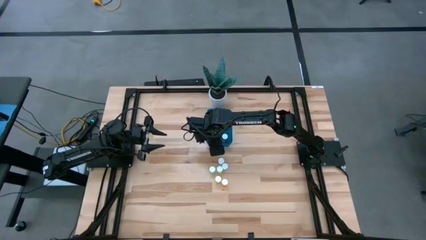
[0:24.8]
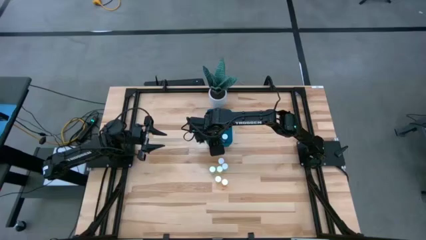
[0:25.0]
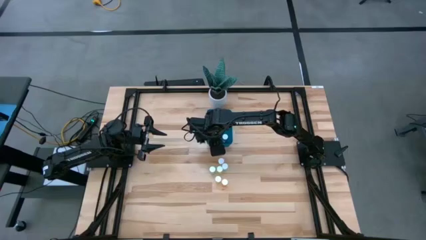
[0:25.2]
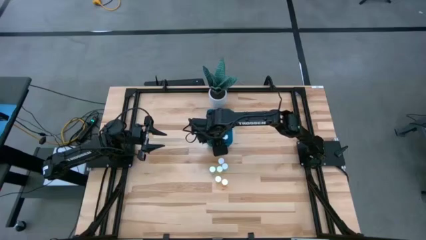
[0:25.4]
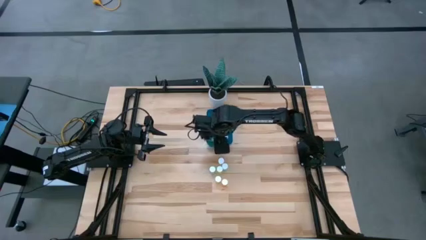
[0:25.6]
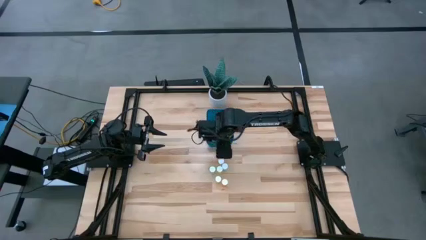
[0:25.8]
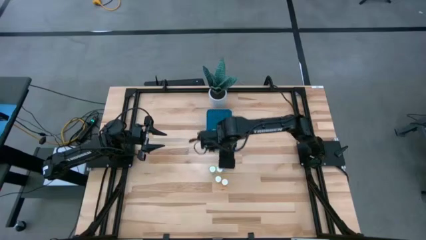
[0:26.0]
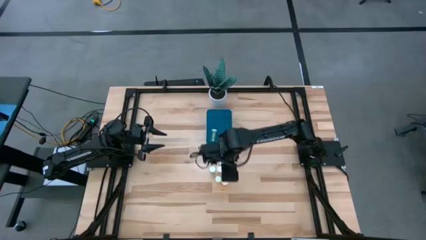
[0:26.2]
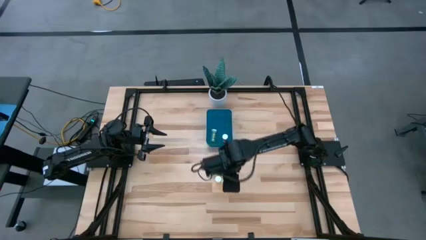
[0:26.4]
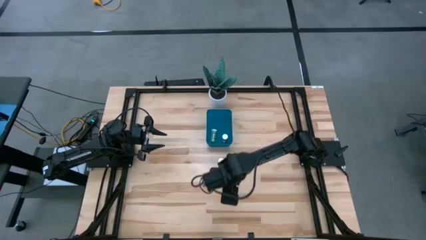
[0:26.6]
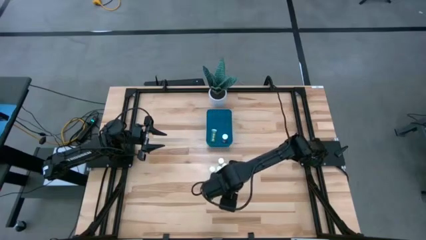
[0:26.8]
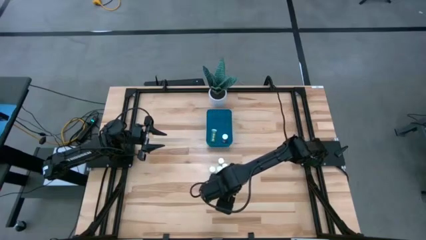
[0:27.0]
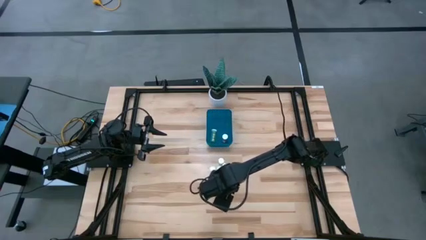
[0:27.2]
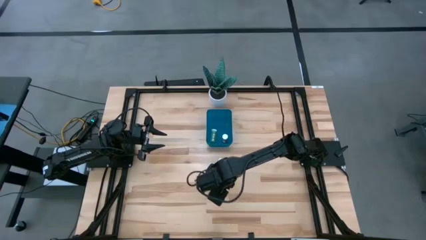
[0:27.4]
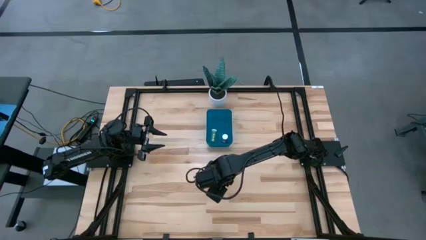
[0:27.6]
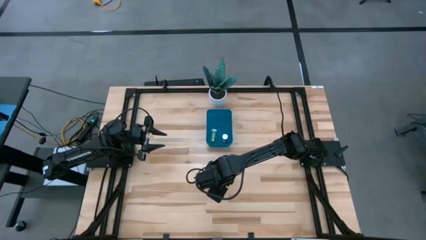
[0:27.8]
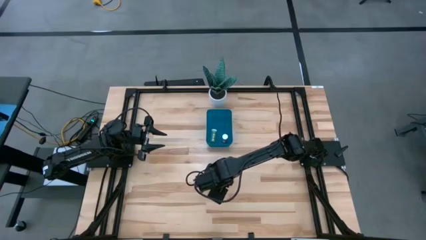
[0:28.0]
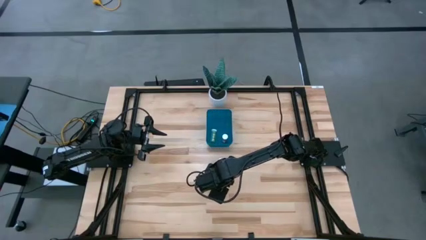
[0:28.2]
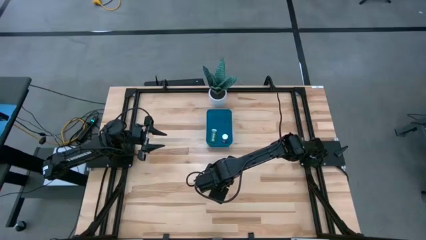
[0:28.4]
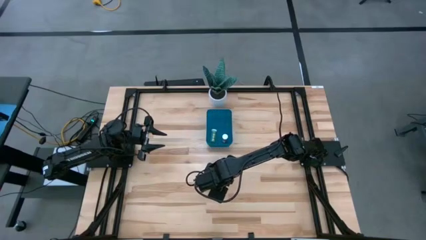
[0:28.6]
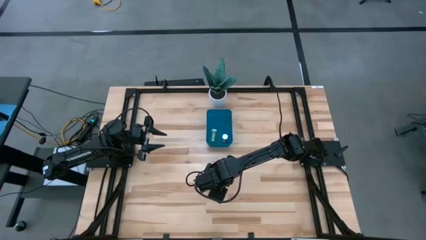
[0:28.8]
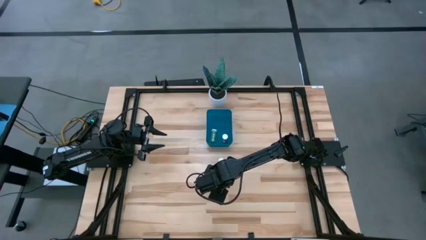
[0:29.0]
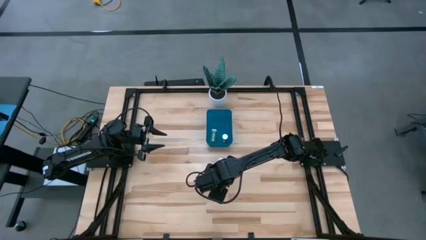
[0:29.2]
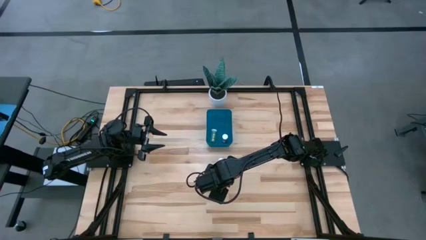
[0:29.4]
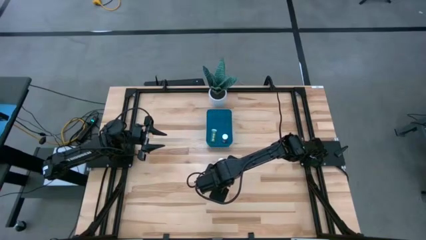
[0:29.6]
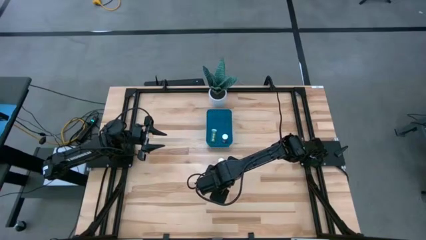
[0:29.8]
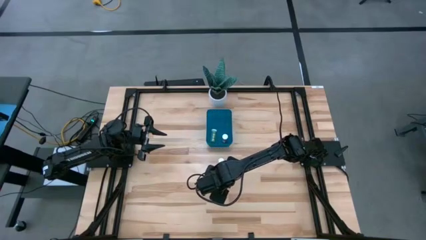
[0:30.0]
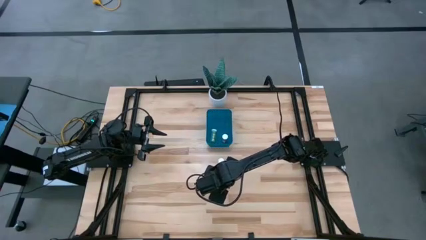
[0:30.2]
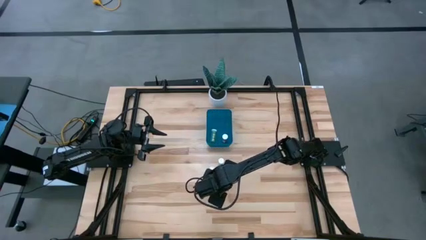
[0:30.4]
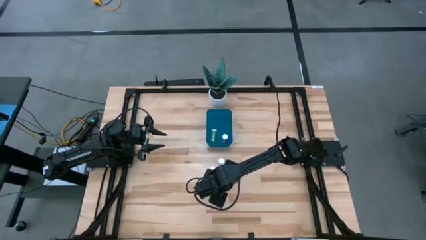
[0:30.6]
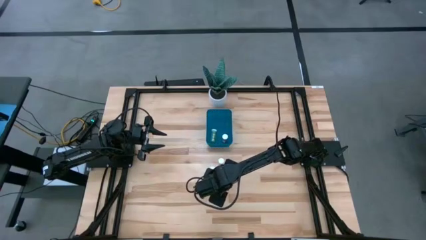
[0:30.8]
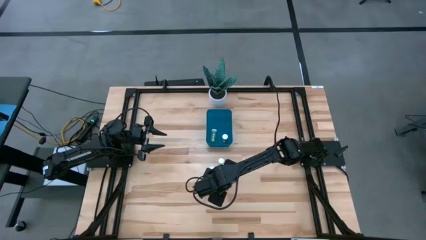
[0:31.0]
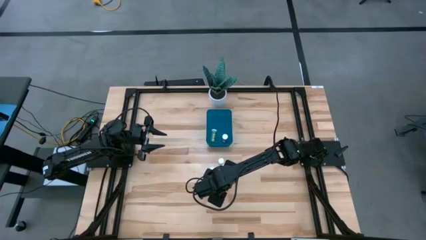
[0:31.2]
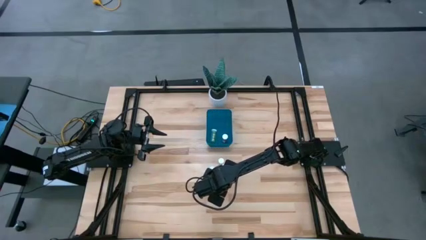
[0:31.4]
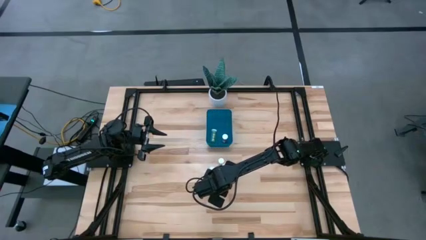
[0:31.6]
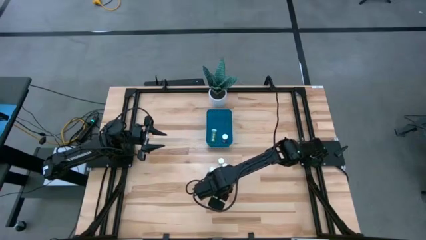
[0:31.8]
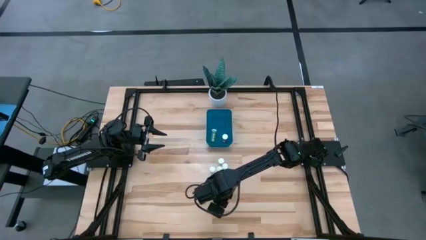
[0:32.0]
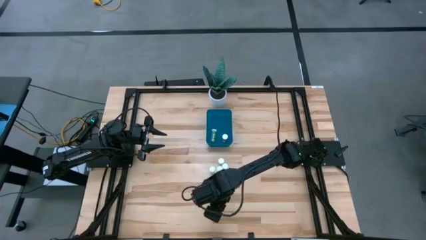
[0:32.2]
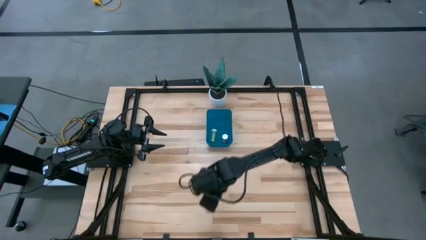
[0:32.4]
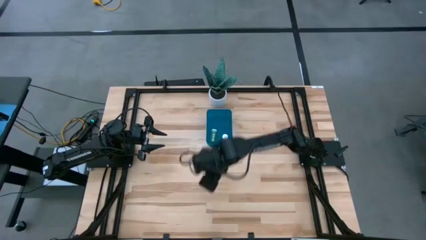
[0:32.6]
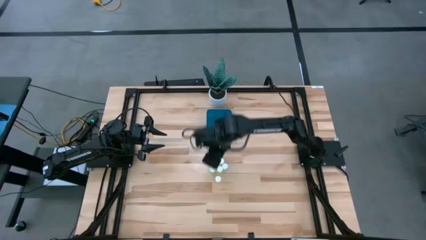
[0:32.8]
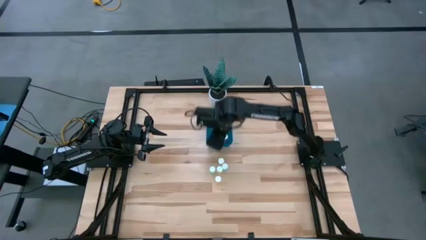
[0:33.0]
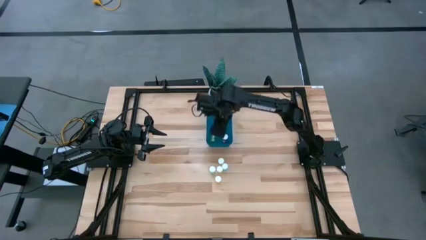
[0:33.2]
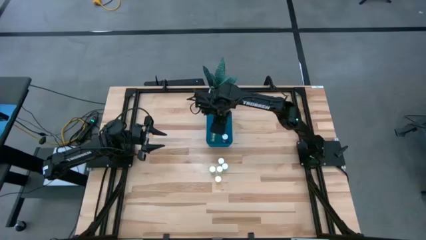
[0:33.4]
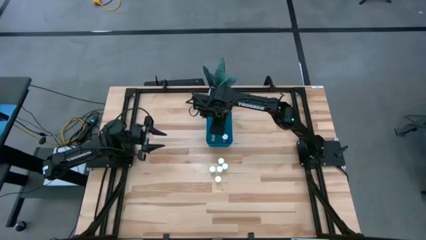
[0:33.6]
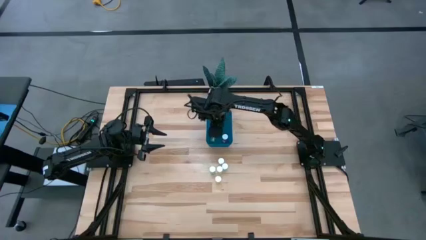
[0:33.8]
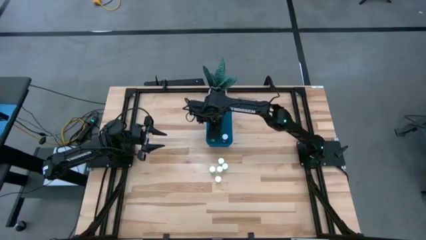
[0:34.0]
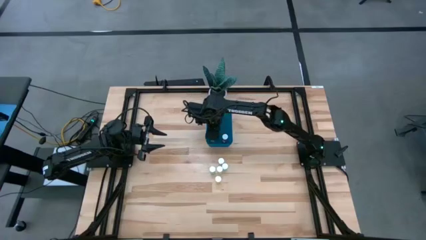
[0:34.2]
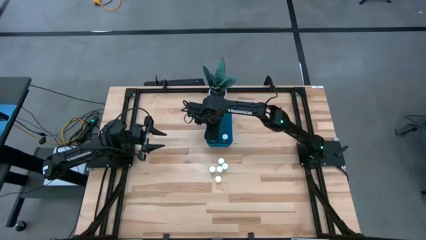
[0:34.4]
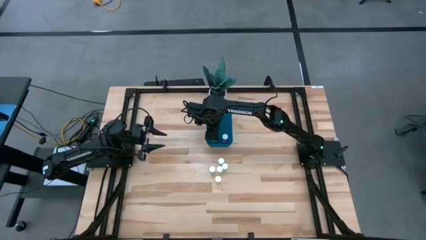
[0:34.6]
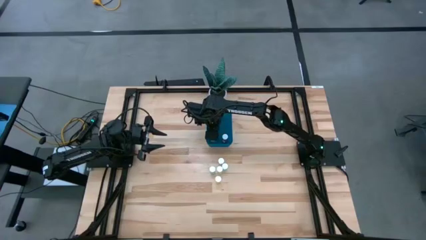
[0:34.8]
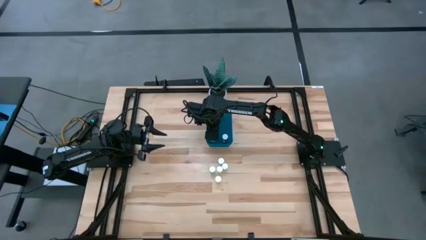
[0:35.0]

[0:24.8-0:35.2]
Task: Pick and place pill bottles into a basket
Put the orange pill bottle into the bin
